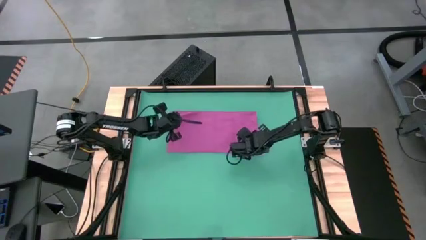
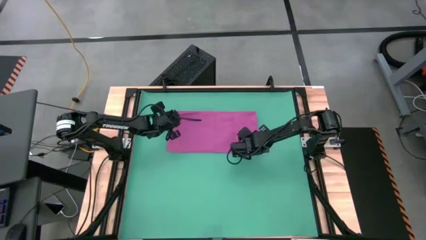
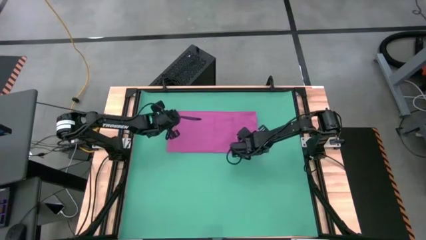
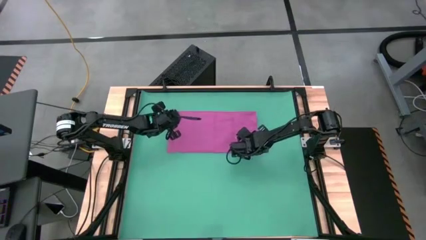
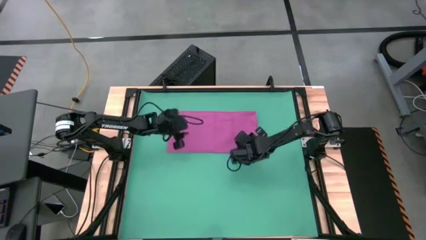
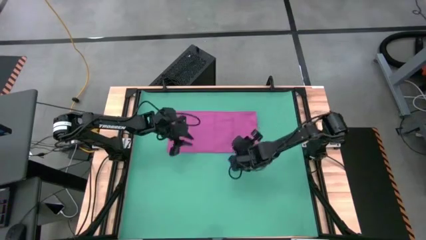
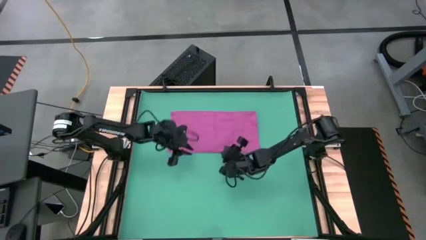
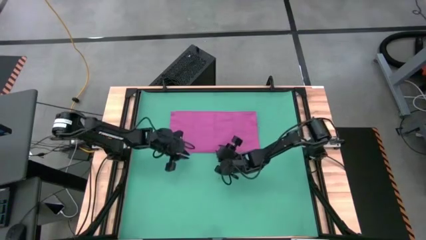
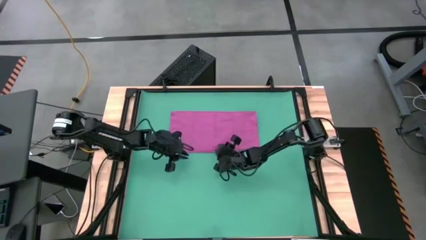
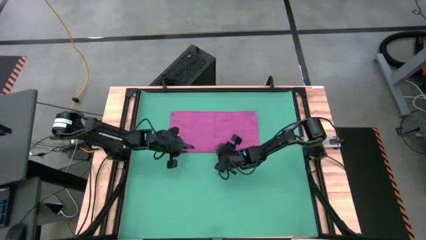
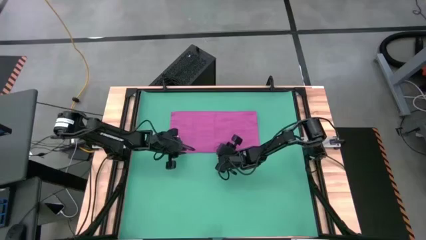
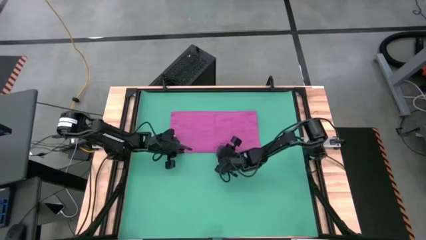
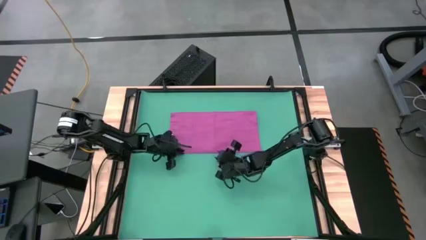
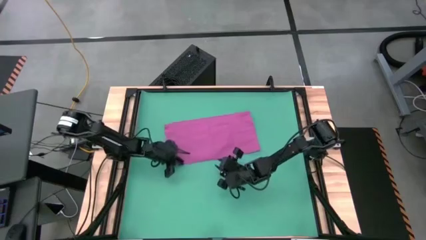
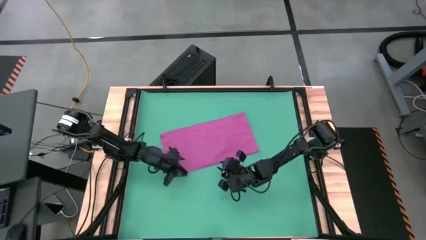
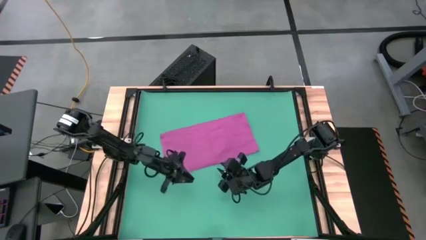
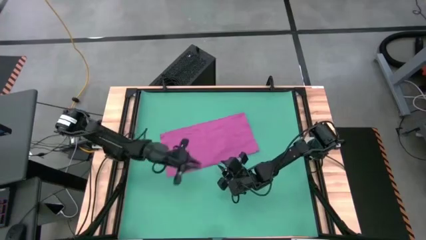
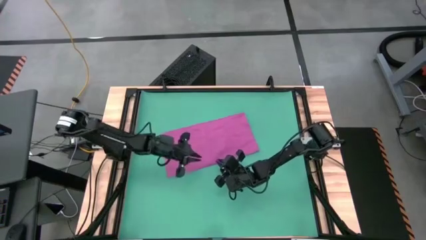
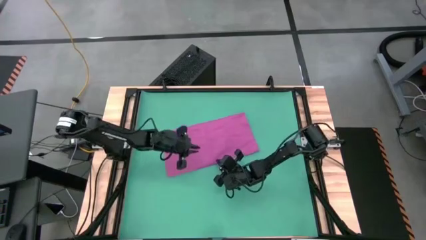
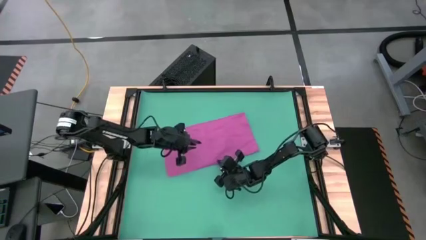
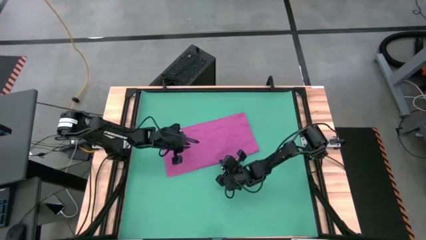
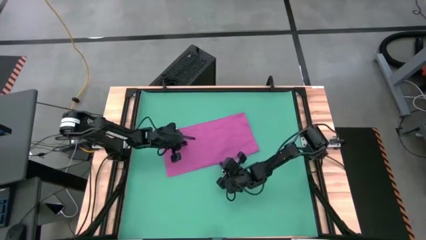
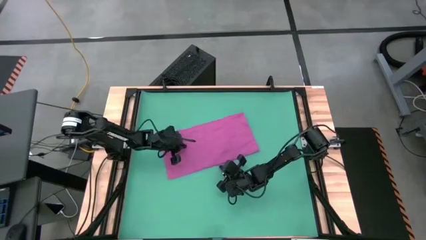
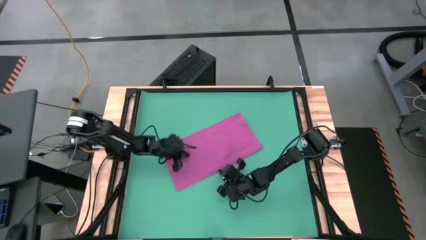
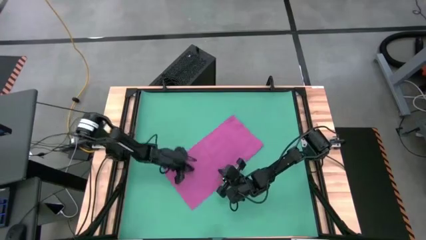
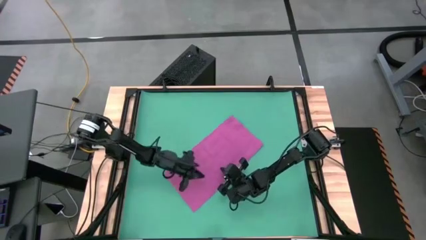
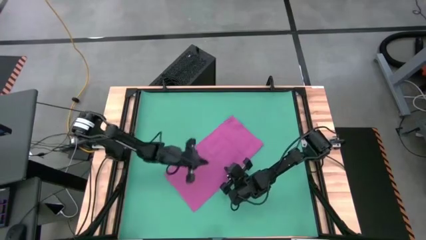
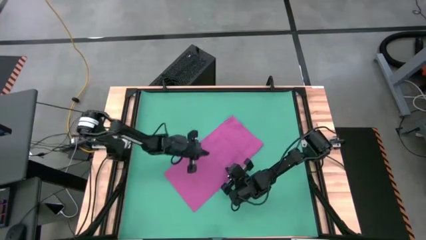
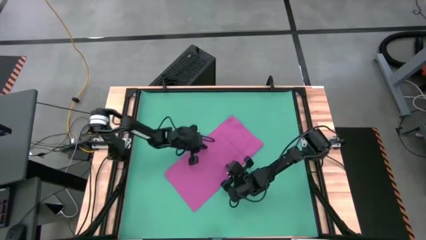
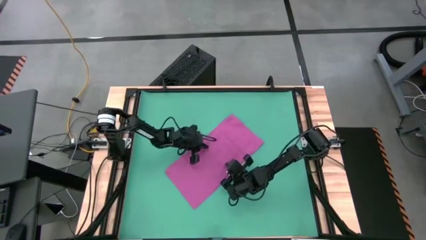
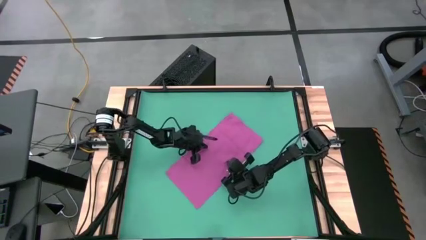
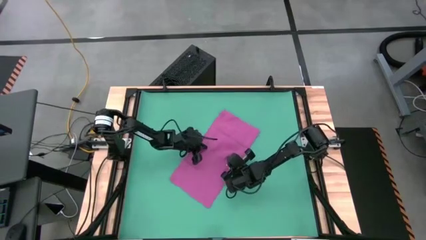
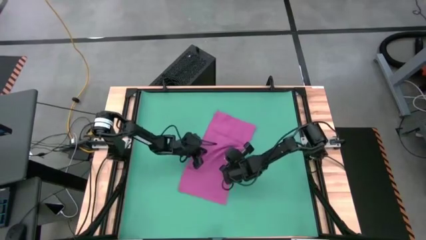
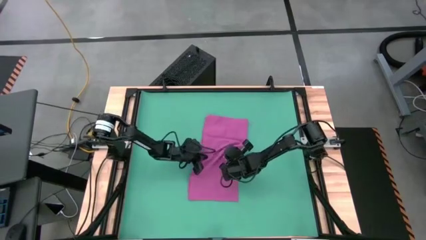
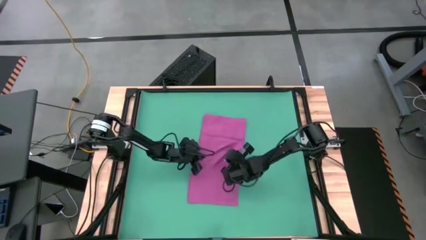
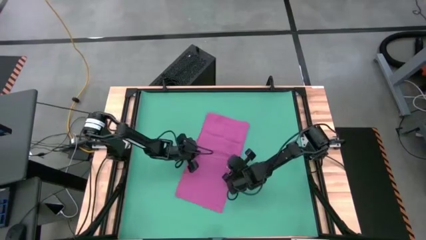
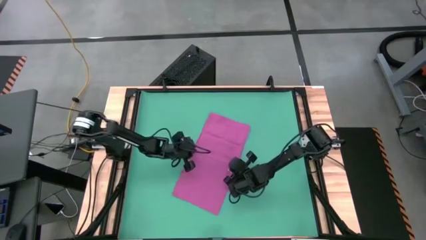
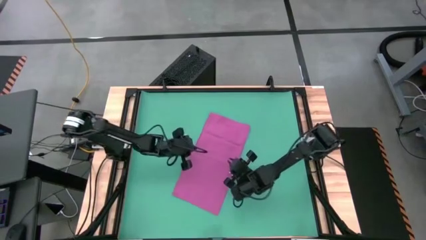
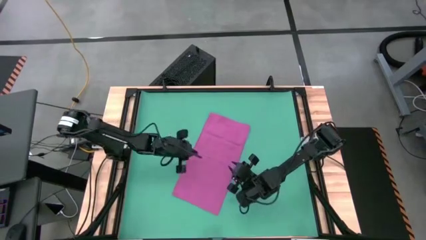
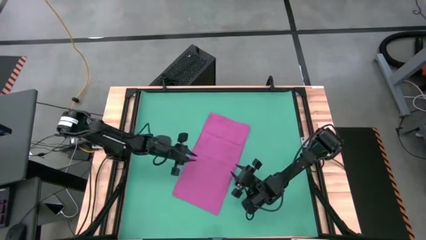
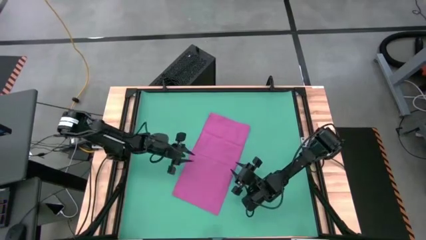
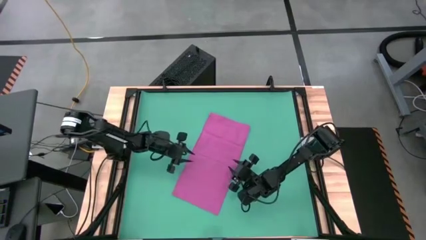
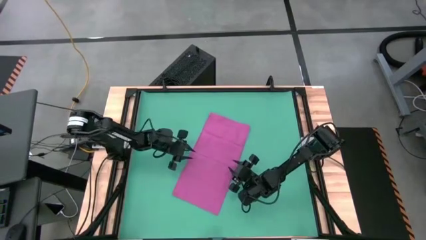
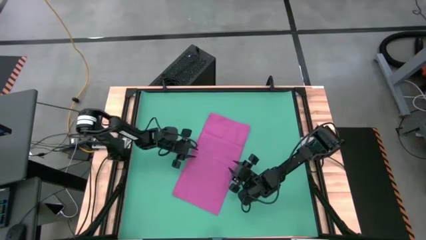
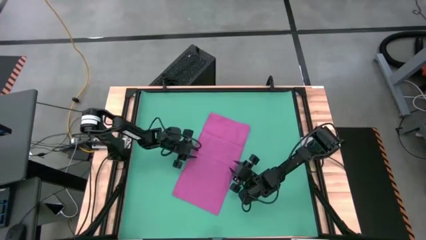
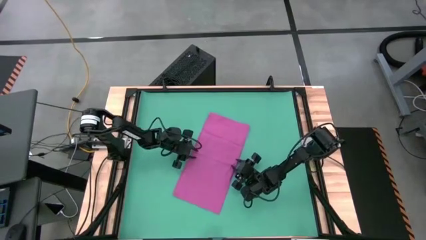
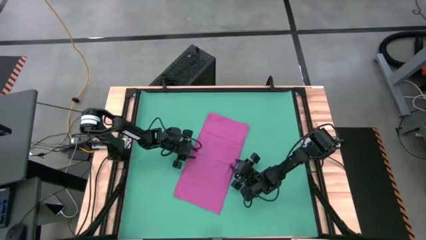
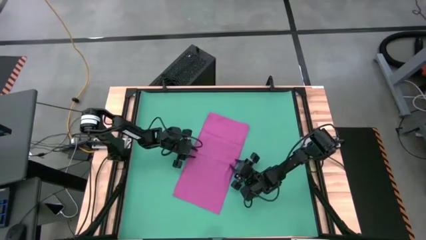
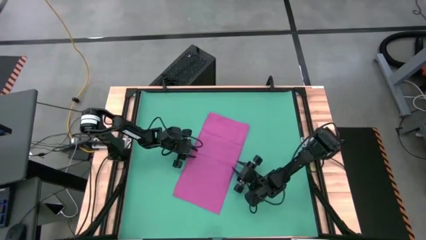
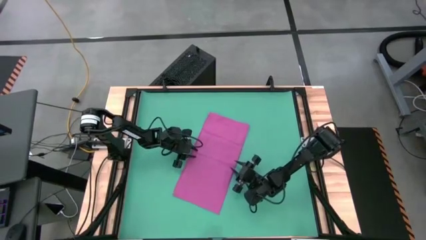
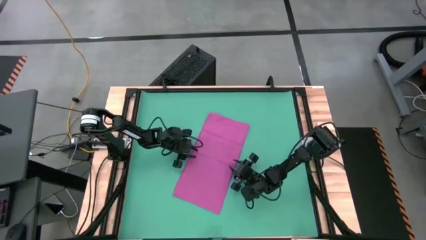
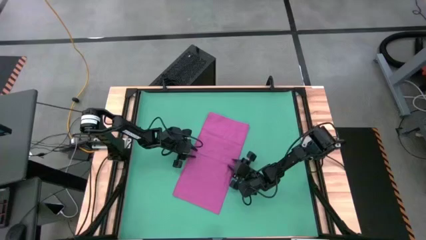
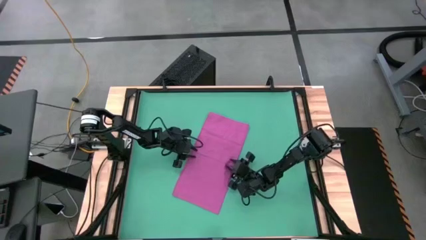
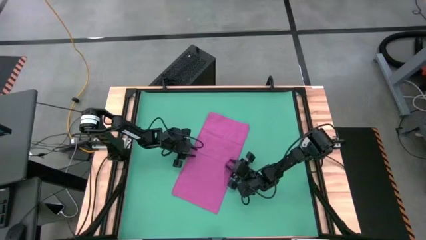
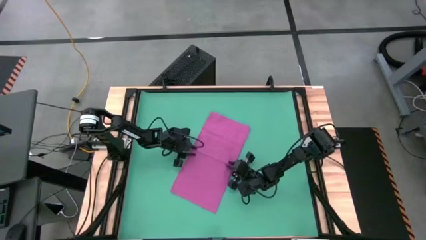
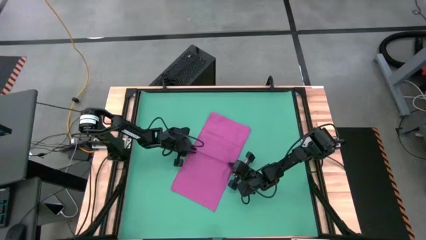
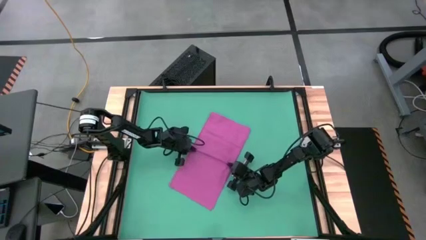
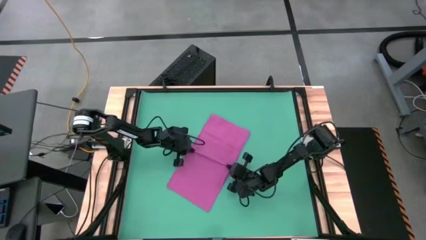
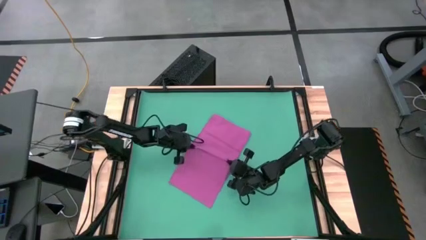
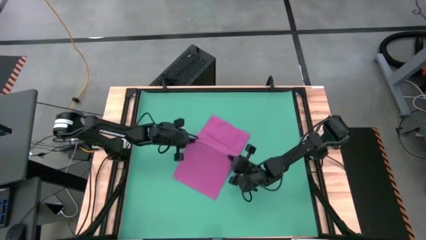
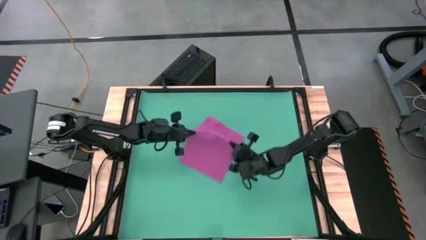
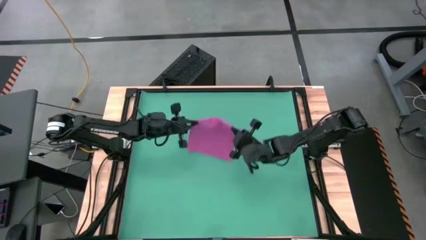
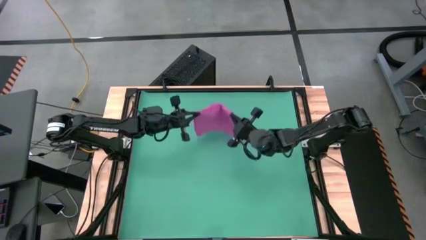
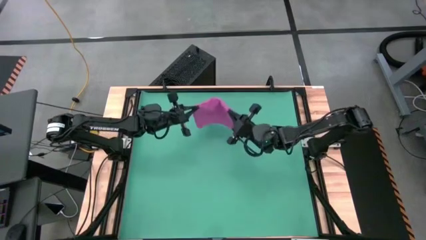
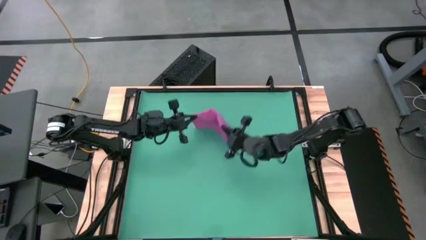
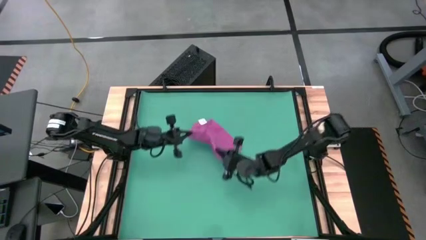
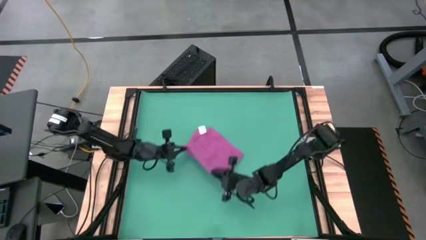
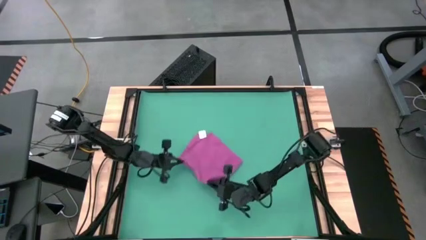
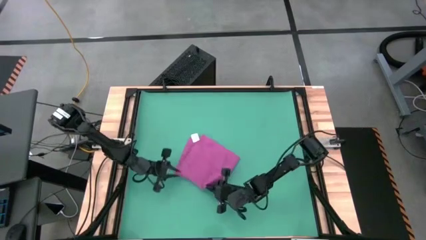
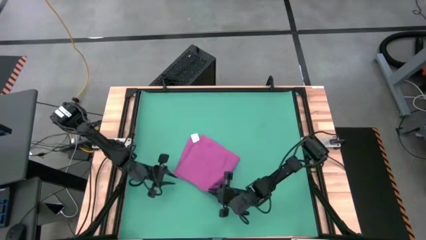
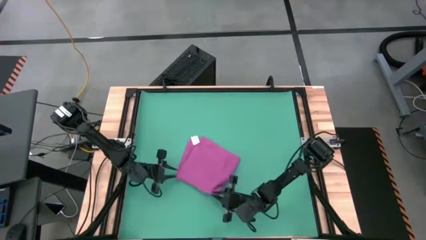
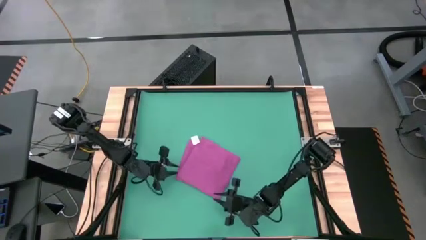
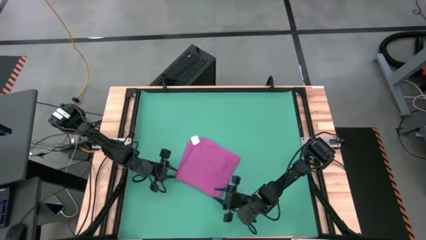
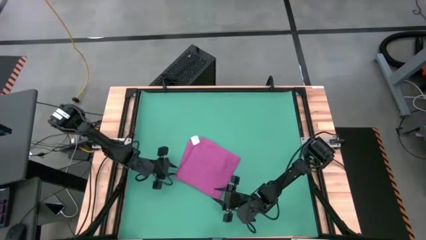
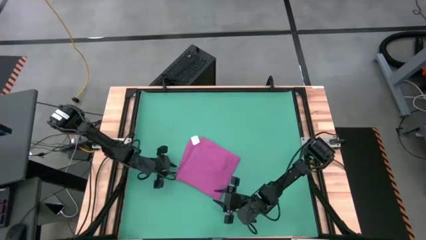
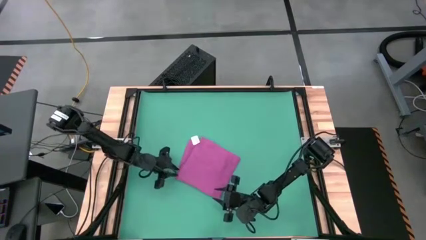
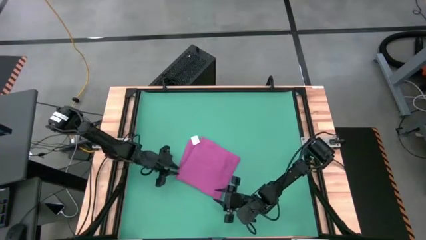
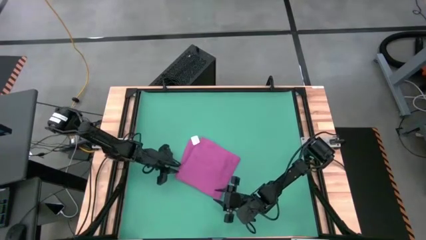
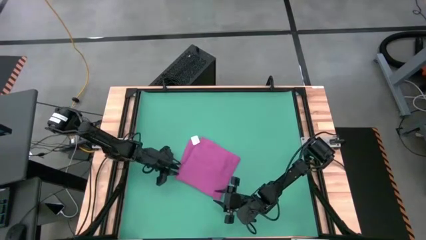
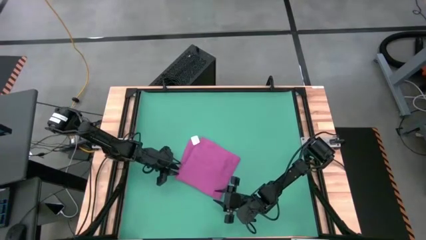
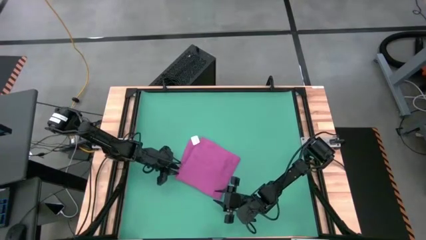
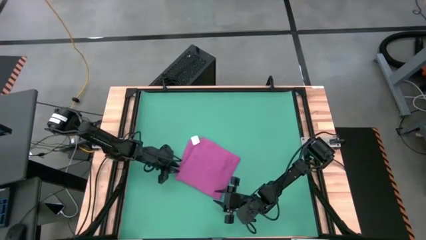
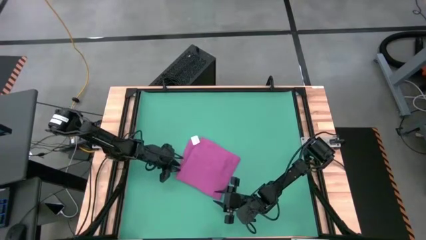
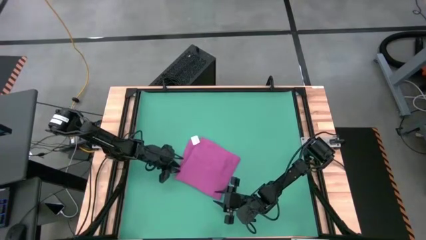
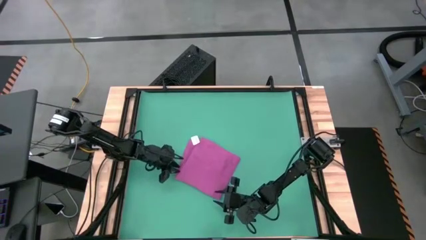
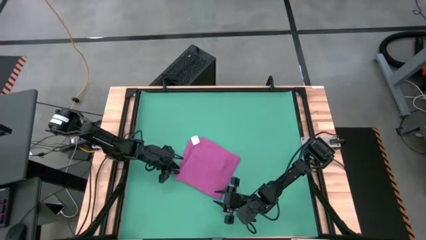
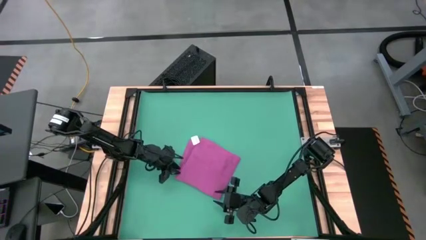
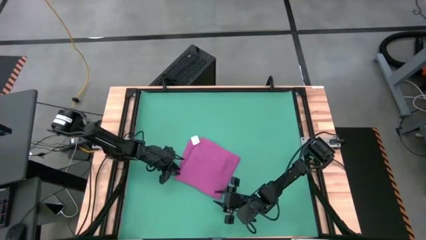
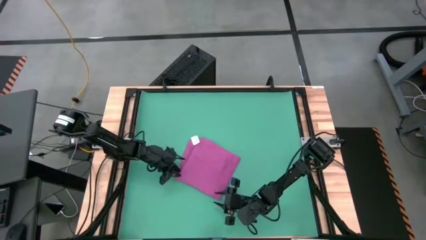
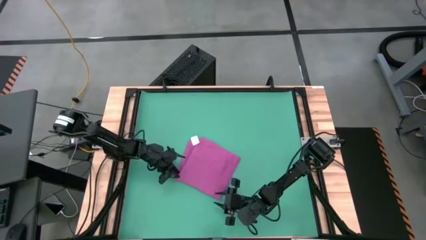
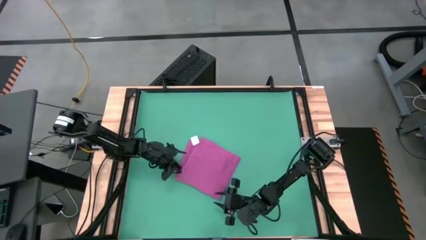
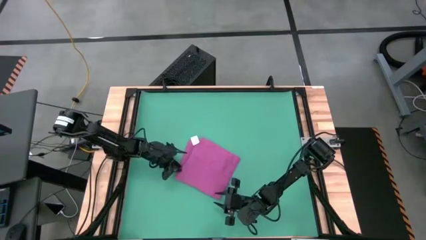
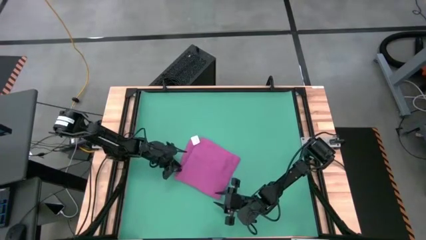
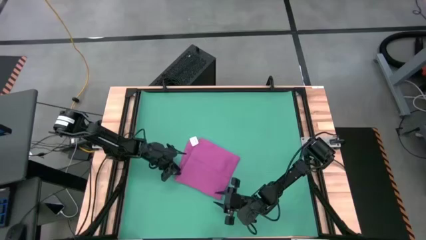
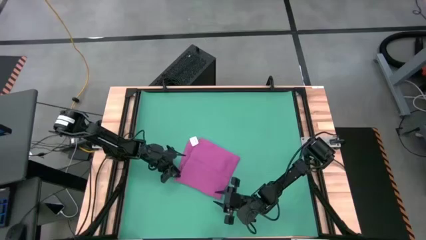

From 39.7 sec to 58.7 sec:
Task: Roll towel
Fold the pink towel
